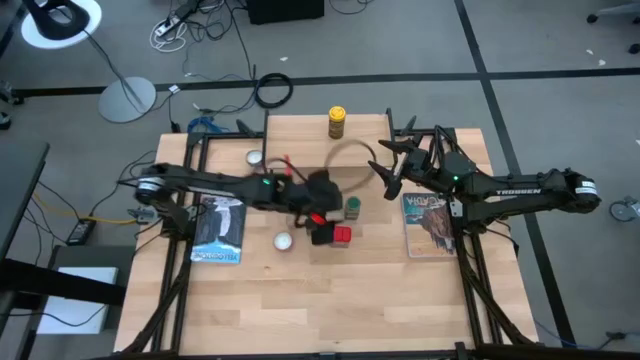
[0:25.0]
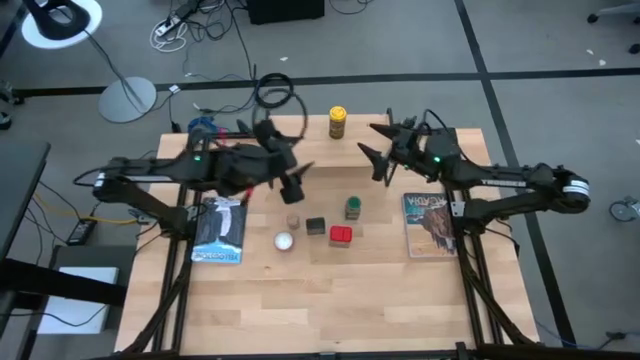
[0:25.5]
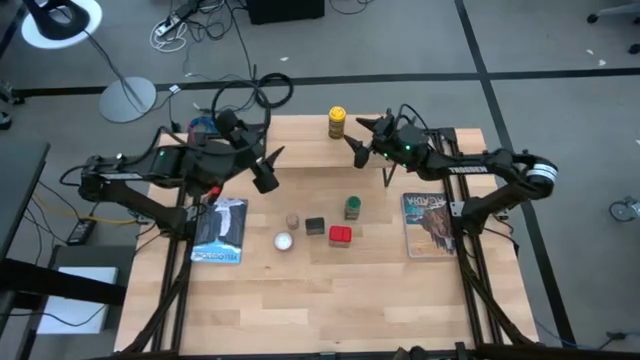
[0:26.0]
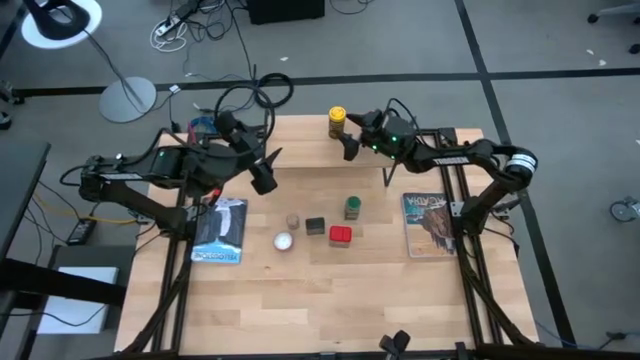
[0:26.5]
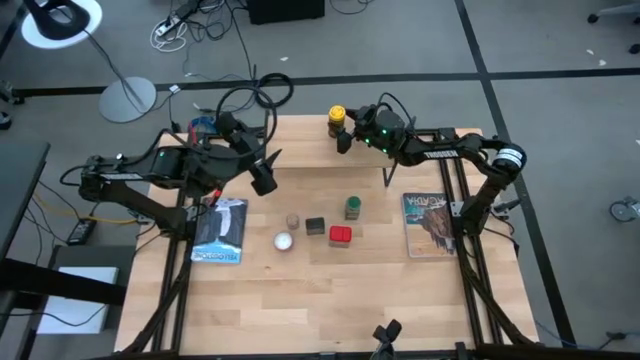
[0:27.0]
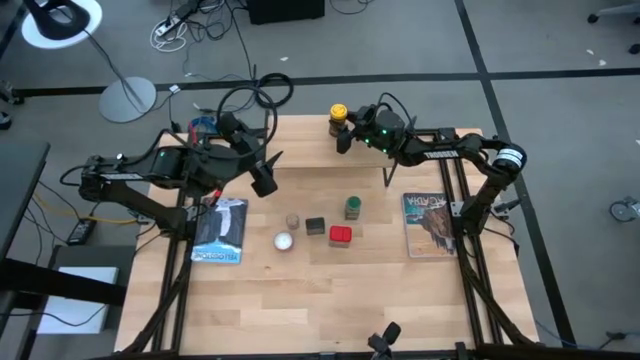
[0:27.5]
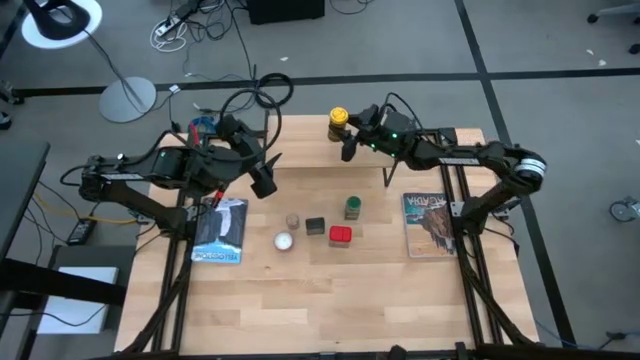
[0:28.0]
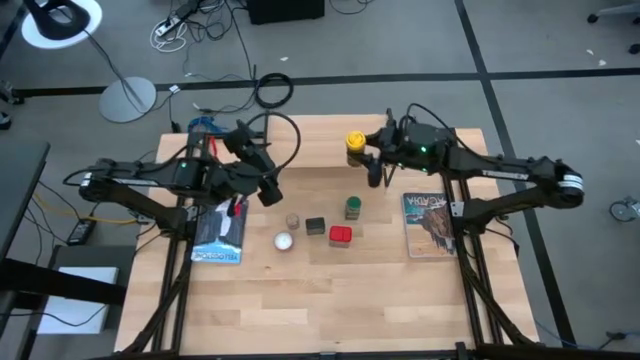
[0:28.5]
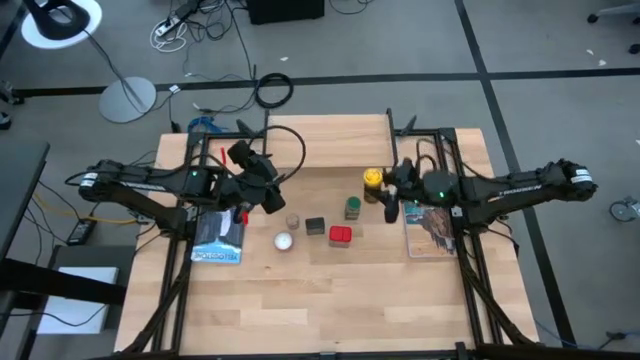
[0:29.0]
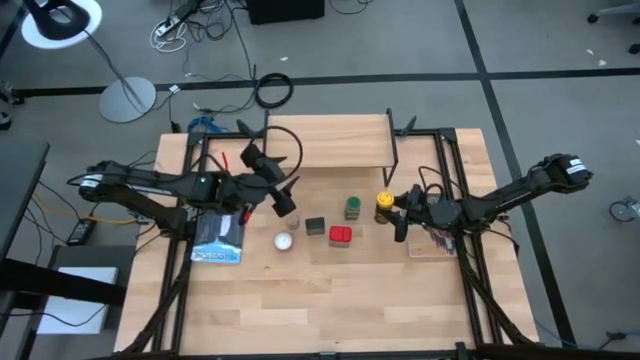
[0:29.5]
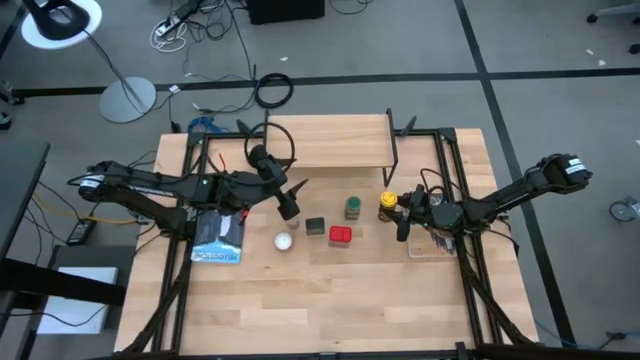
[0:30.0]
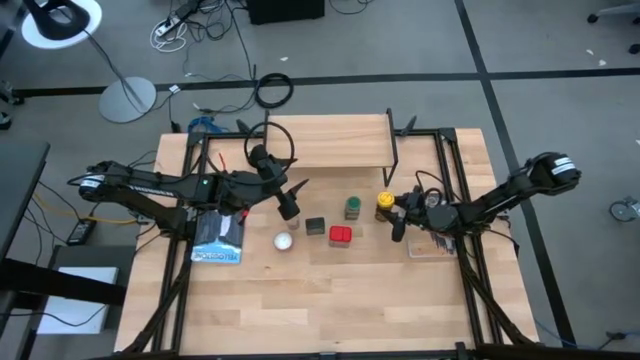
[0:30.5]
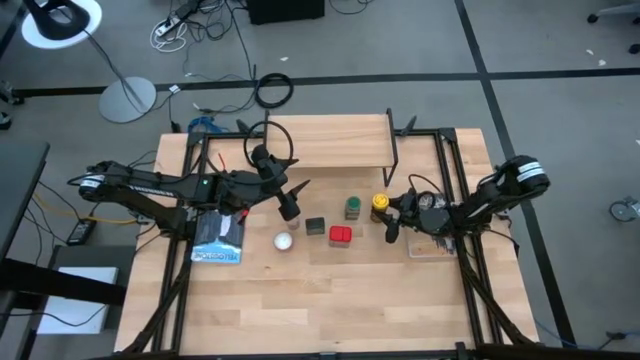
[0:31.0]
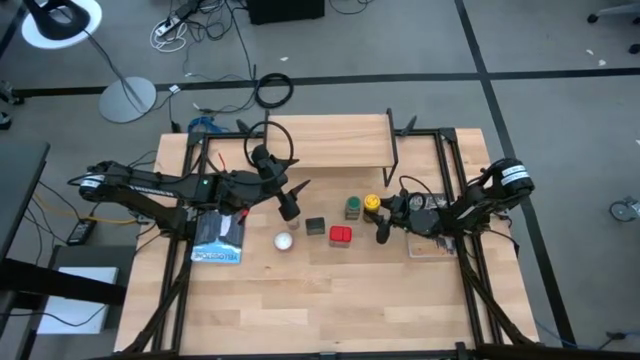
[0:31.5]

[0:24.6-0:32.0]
Task: Shelf spices
Remove the yellow seasoning bottle from the shelf

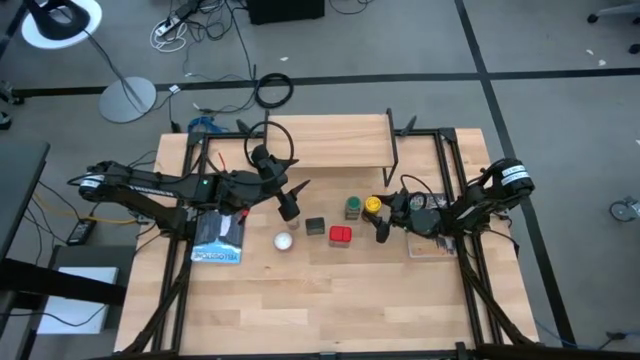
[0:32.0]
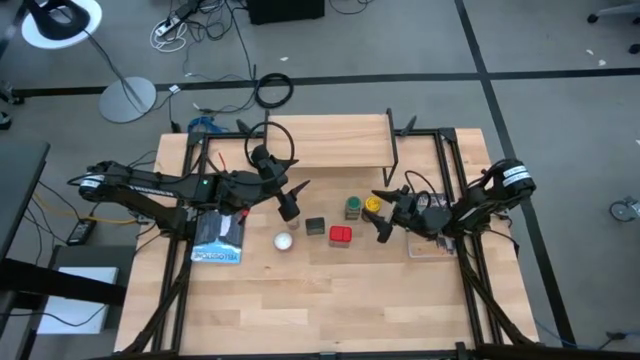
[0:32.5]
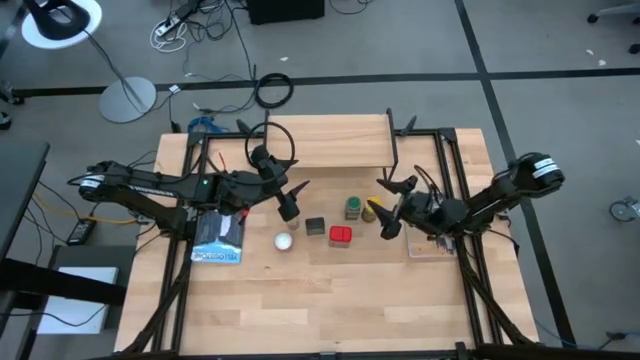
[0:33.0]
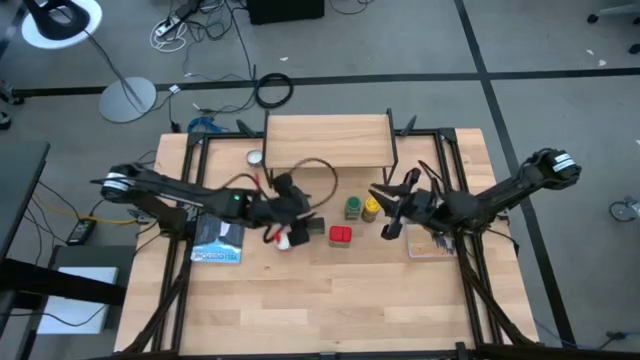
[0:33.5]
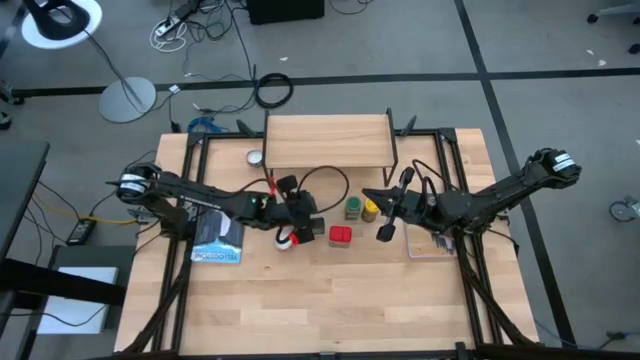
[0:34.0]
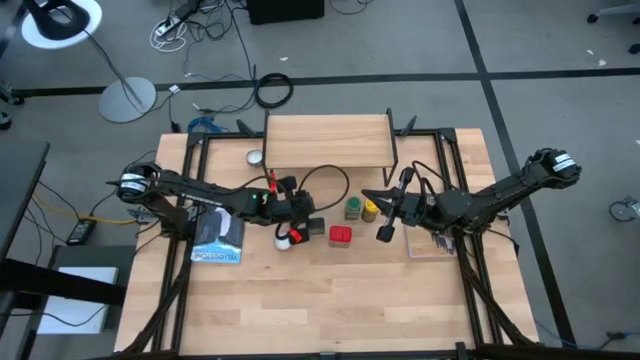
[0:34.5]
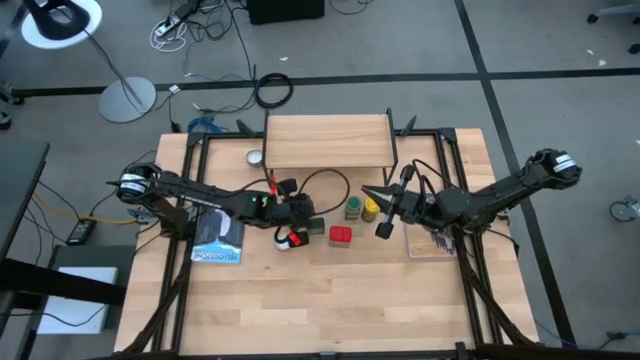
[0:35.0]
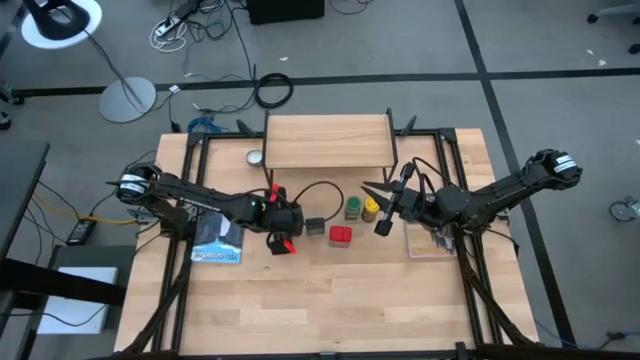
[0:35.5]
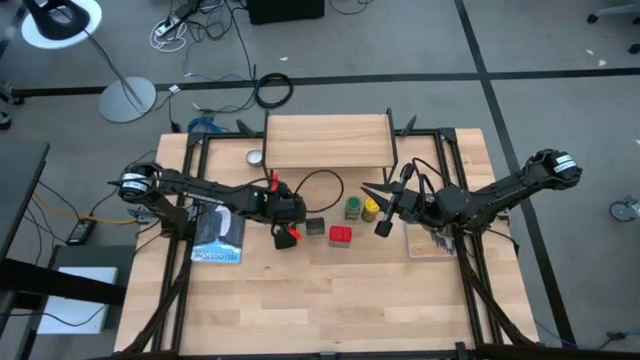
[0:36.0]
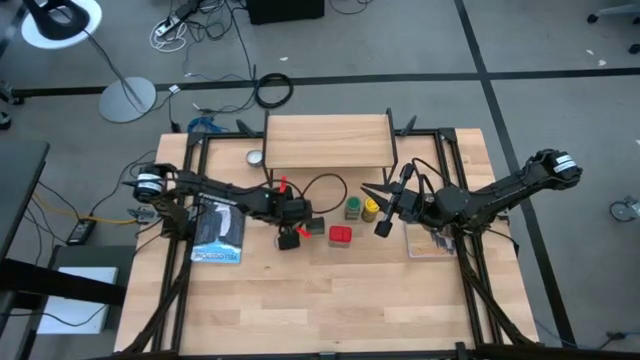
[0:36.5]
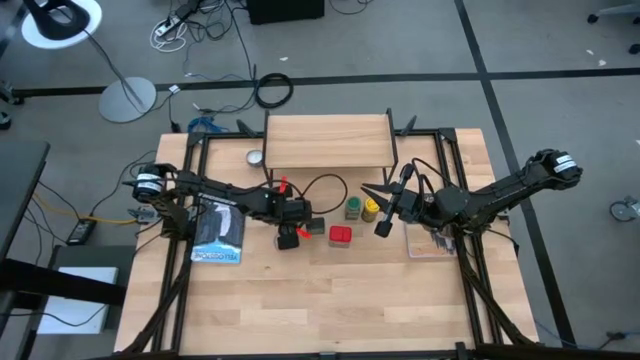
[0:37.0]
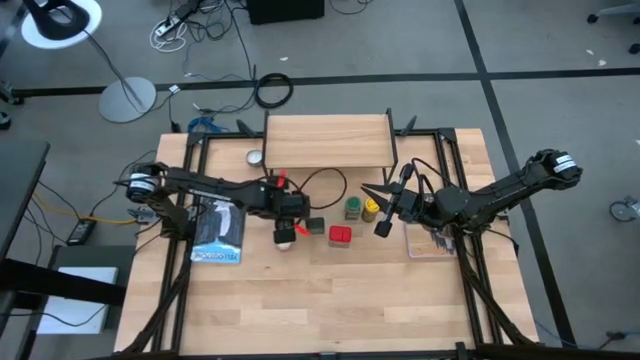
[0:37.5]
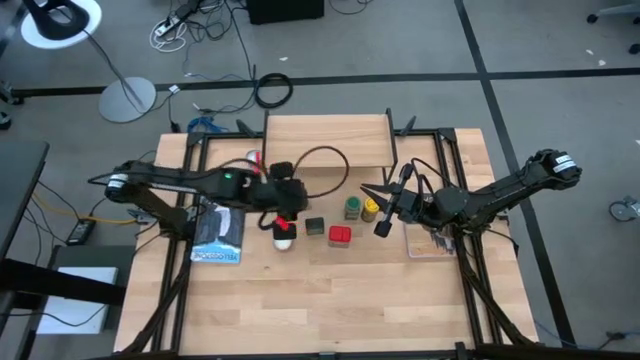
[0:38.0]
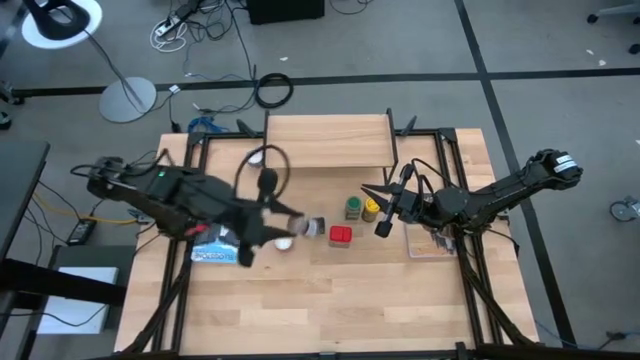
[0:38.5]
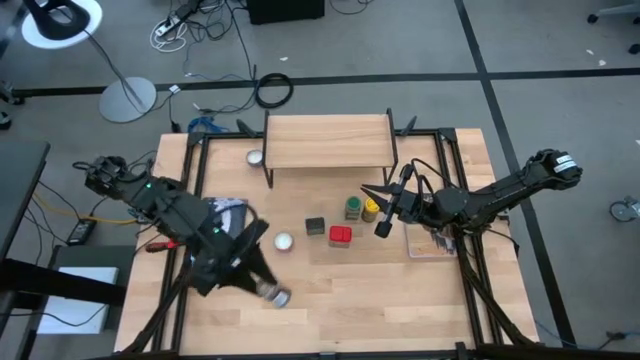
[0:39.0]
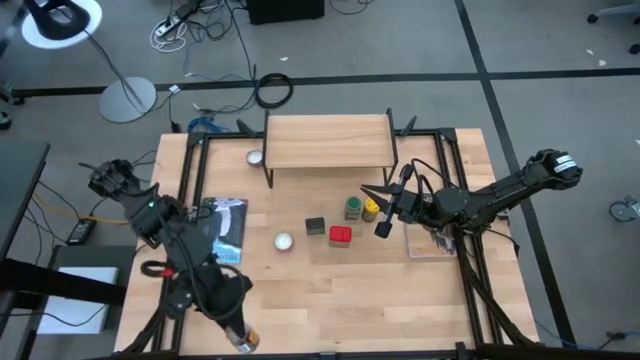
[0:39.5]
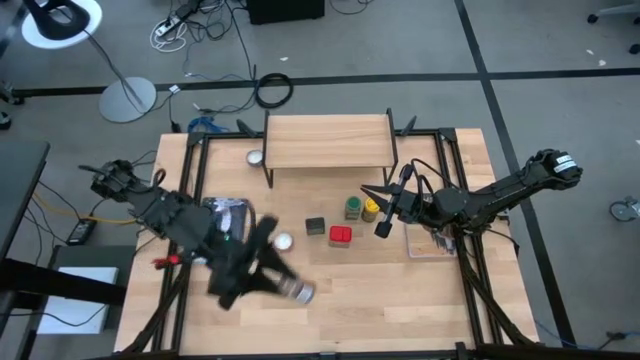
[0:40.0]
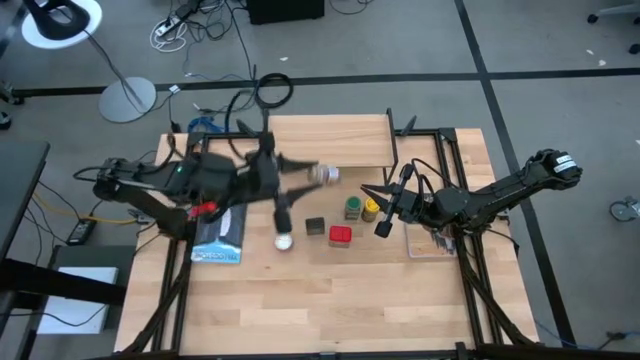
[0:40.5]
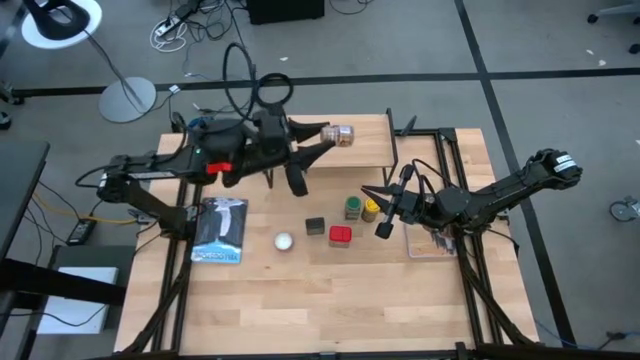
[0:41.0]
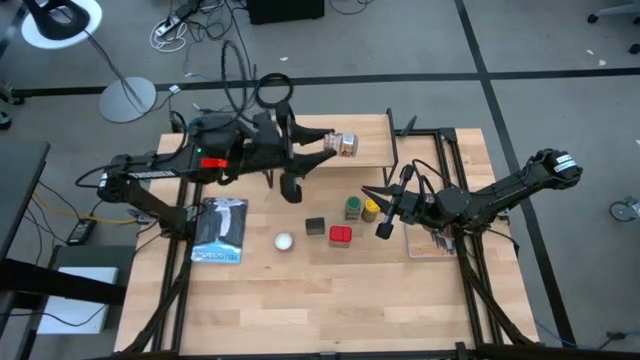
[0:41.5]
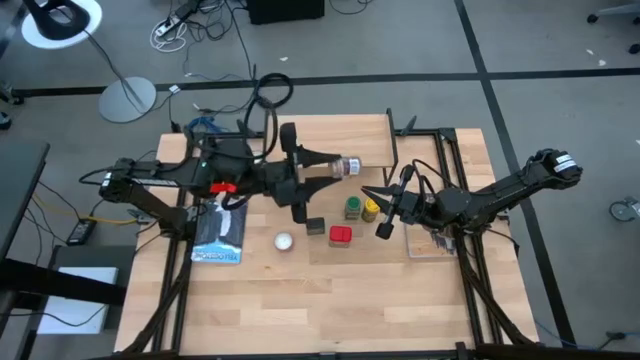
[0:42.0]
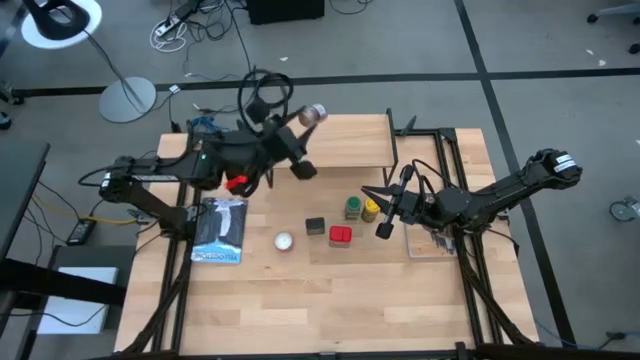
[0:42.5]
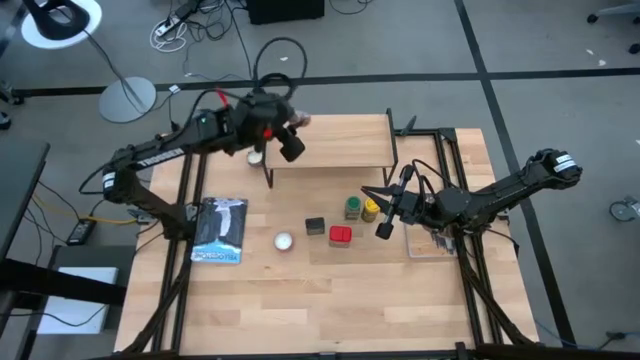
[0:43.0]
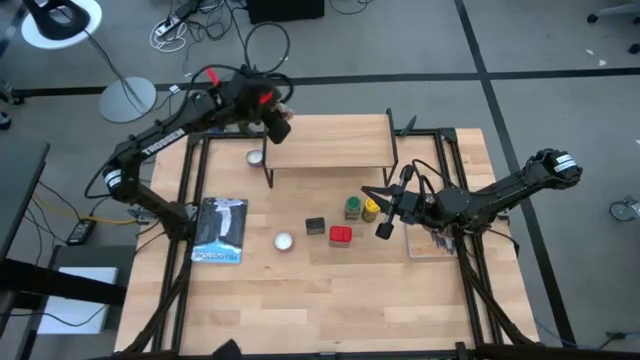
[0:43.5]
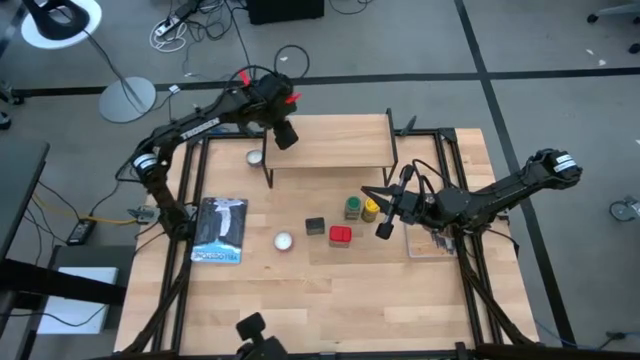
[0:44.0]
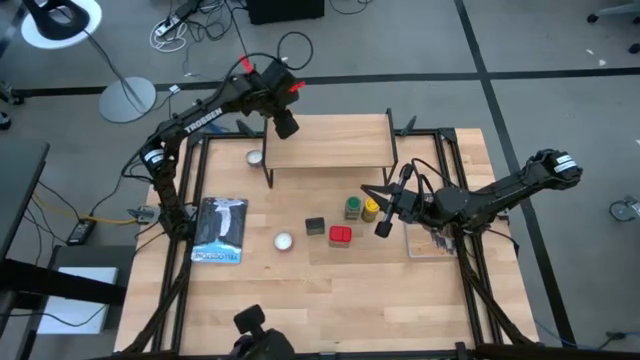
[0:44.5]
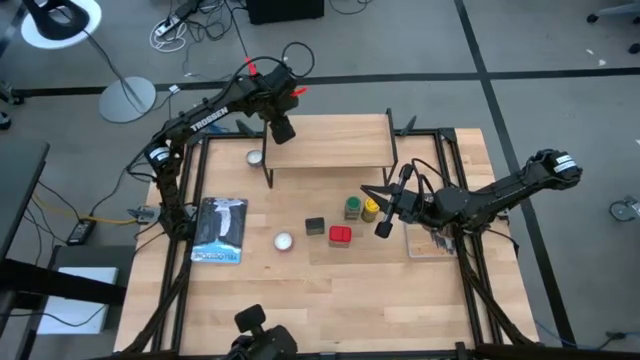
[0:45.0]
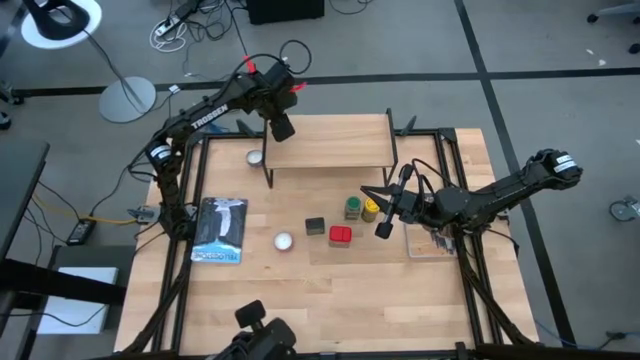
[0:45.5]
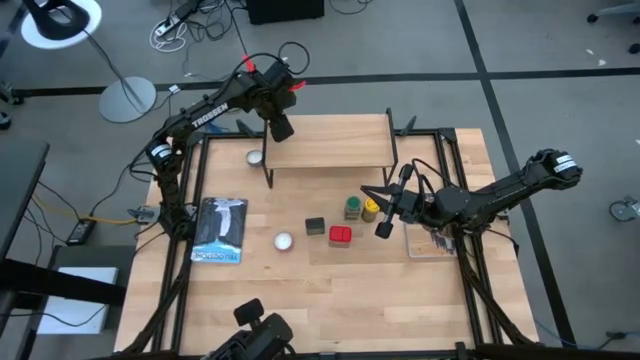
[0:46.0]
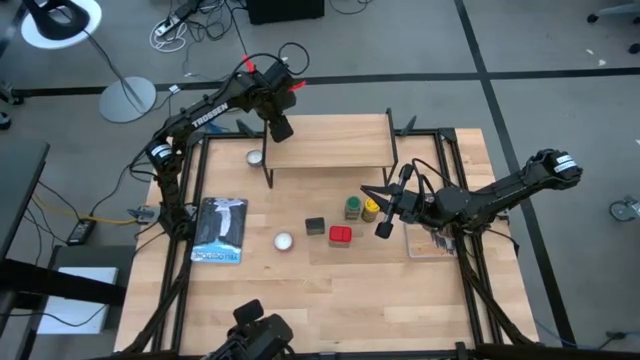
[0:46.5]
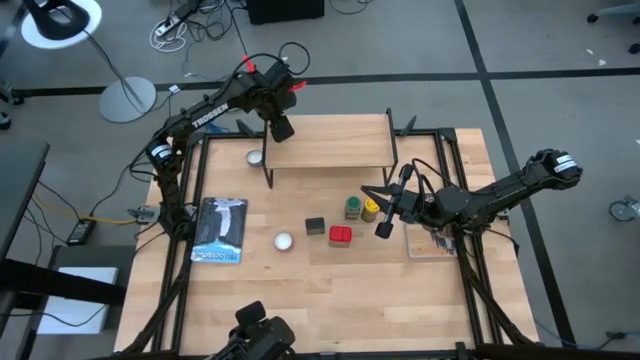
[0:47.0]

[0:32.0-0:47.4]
Put the brown seasoning bottle on the shelf
